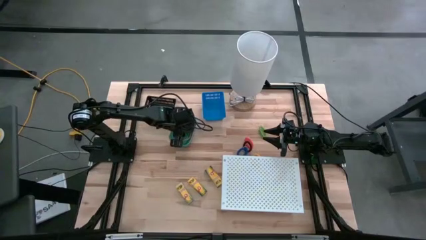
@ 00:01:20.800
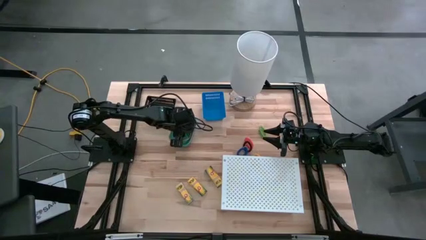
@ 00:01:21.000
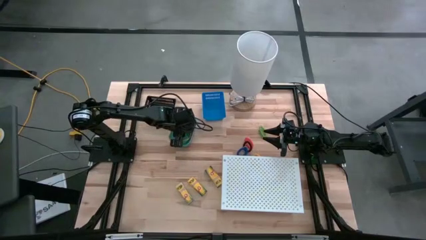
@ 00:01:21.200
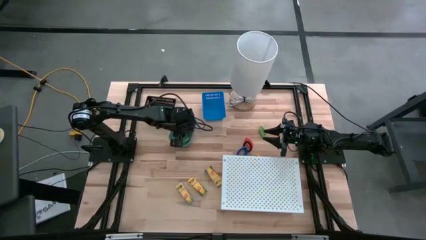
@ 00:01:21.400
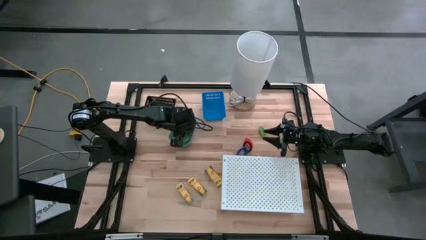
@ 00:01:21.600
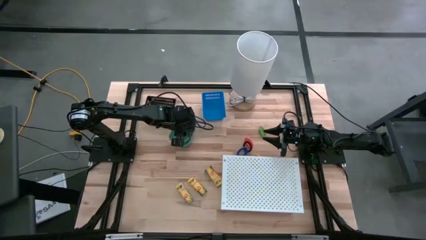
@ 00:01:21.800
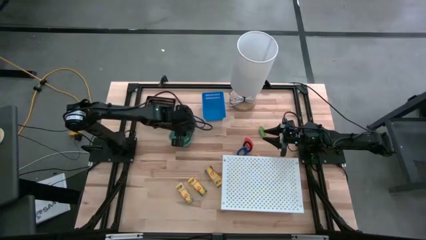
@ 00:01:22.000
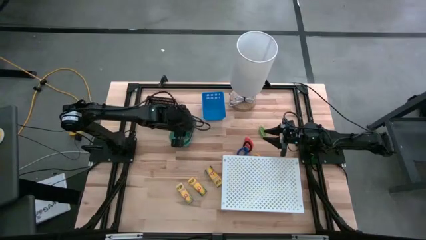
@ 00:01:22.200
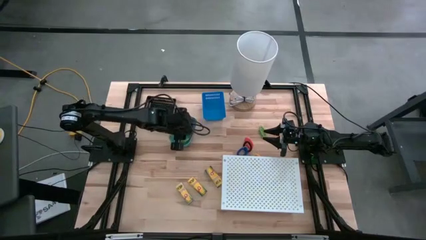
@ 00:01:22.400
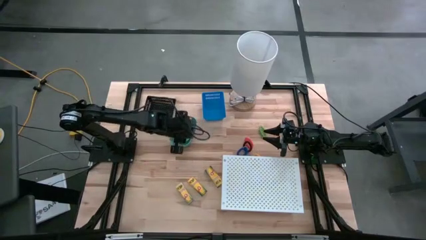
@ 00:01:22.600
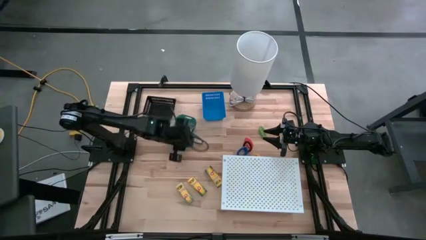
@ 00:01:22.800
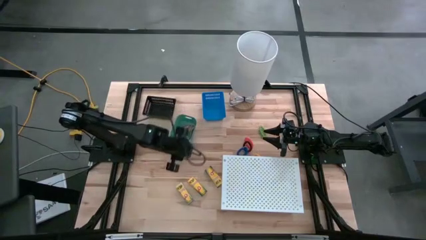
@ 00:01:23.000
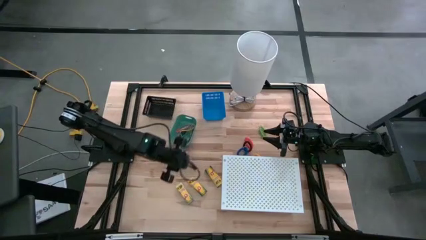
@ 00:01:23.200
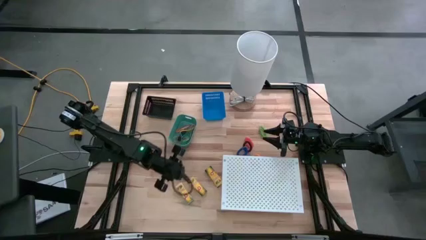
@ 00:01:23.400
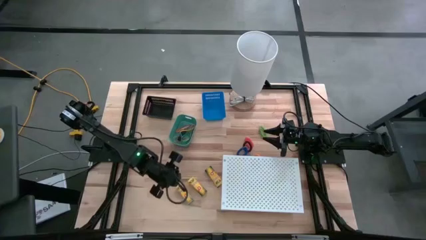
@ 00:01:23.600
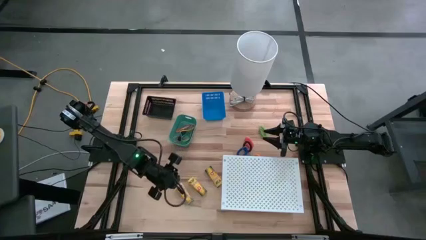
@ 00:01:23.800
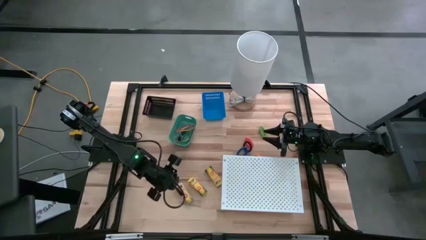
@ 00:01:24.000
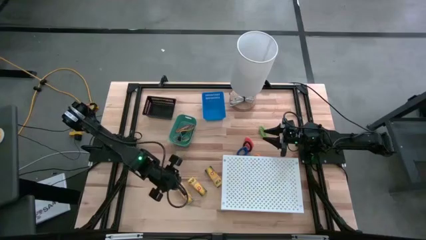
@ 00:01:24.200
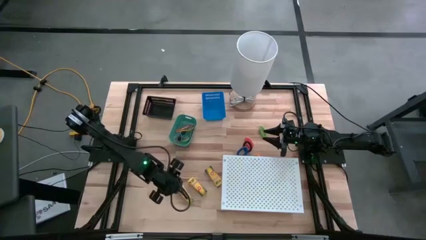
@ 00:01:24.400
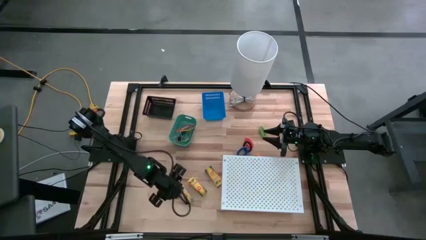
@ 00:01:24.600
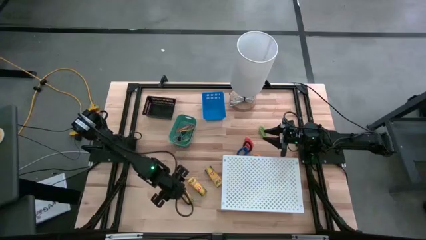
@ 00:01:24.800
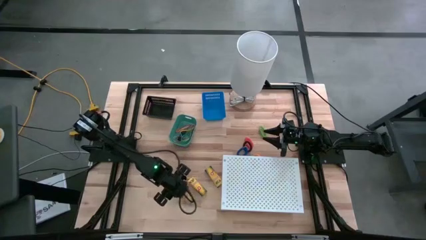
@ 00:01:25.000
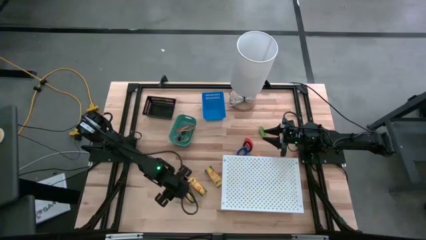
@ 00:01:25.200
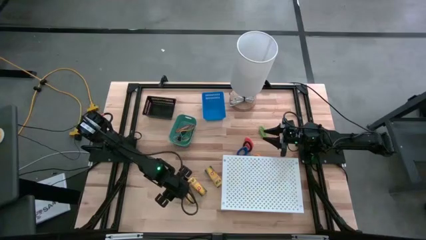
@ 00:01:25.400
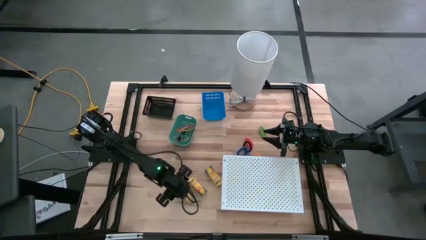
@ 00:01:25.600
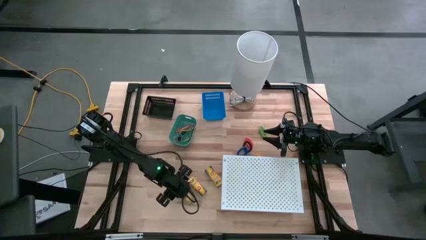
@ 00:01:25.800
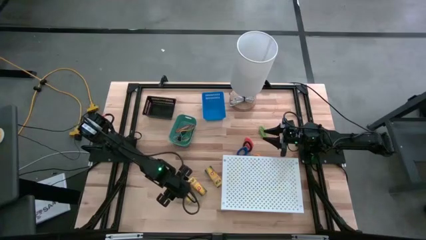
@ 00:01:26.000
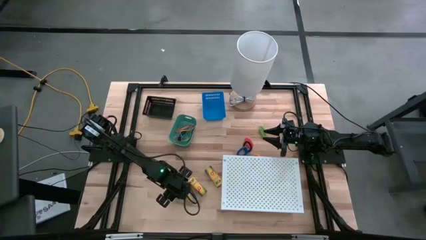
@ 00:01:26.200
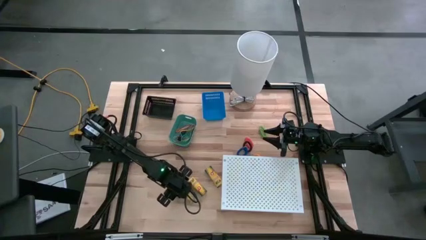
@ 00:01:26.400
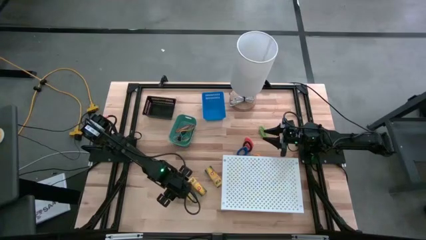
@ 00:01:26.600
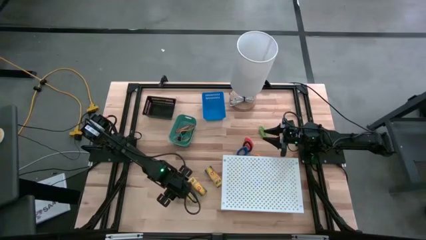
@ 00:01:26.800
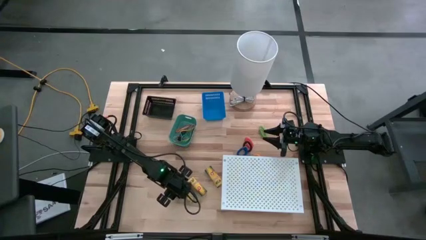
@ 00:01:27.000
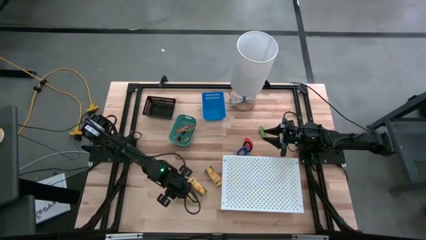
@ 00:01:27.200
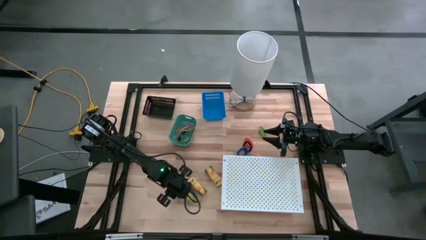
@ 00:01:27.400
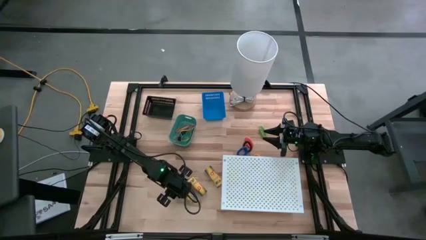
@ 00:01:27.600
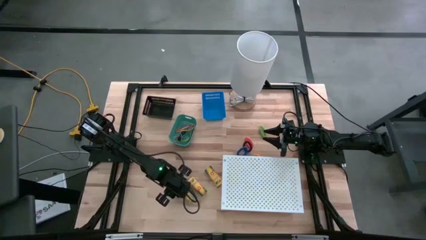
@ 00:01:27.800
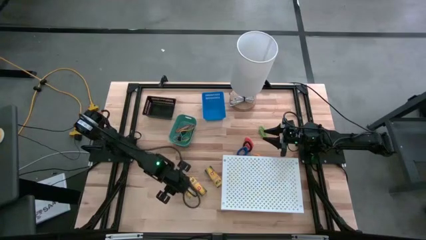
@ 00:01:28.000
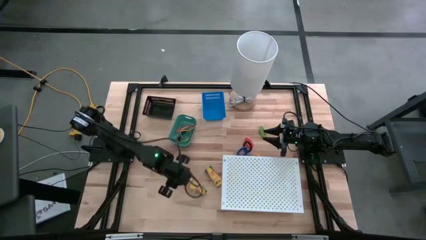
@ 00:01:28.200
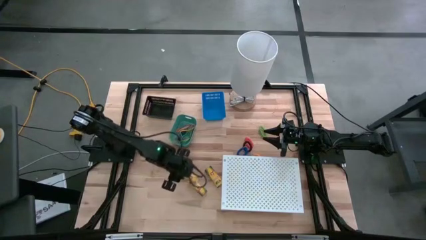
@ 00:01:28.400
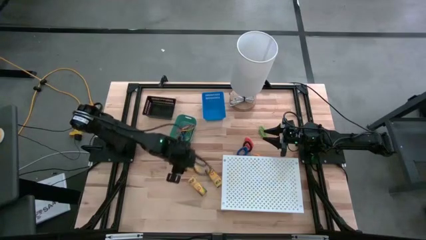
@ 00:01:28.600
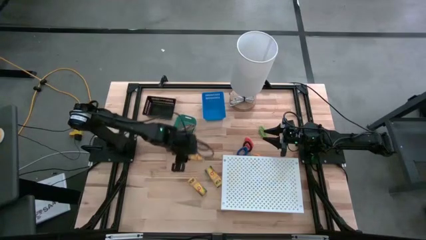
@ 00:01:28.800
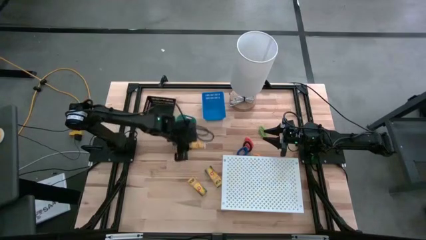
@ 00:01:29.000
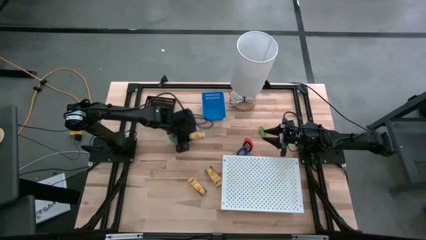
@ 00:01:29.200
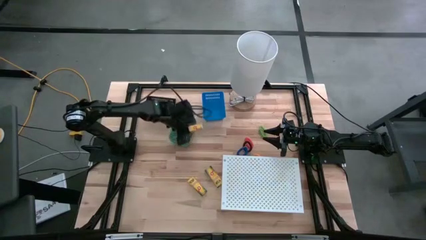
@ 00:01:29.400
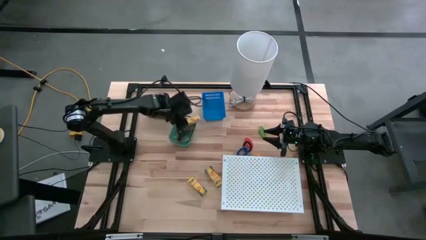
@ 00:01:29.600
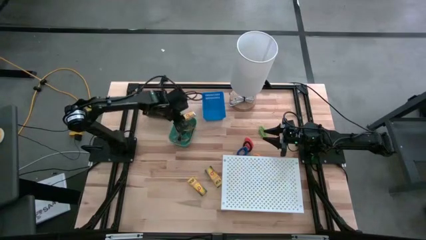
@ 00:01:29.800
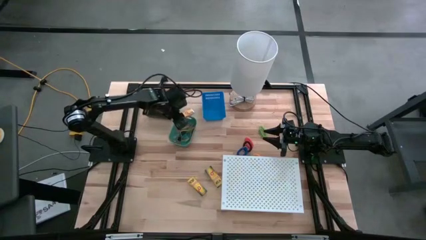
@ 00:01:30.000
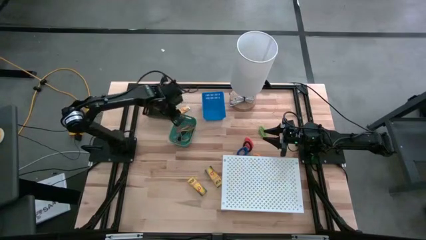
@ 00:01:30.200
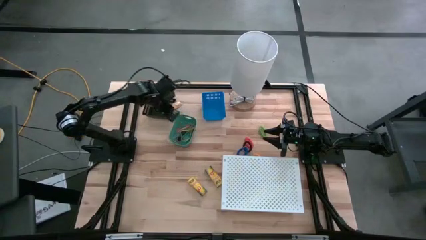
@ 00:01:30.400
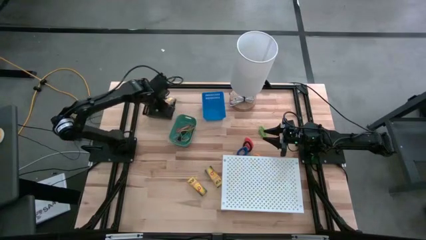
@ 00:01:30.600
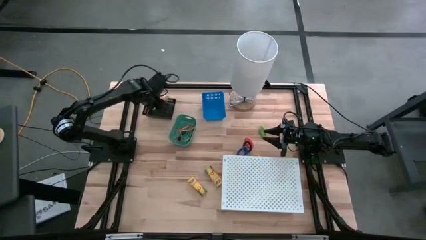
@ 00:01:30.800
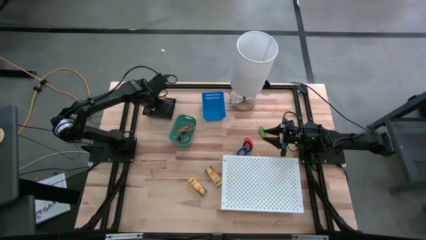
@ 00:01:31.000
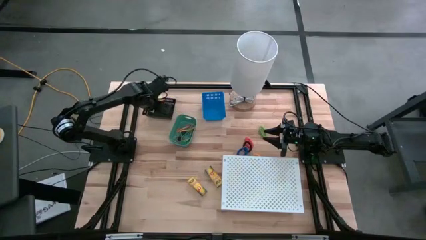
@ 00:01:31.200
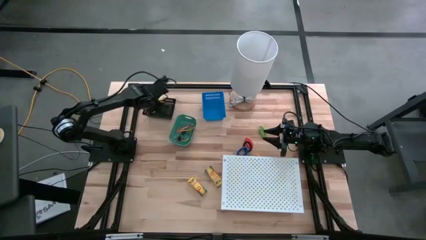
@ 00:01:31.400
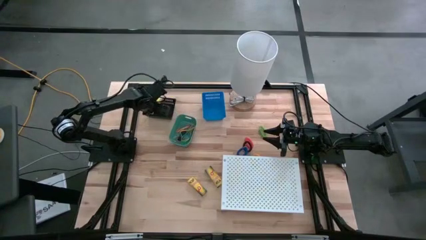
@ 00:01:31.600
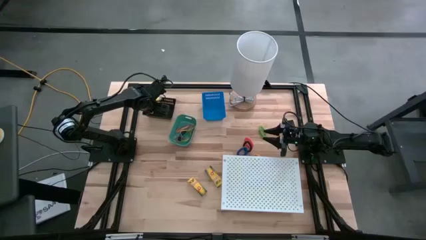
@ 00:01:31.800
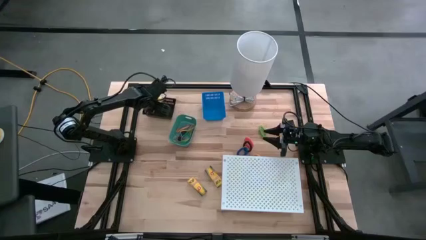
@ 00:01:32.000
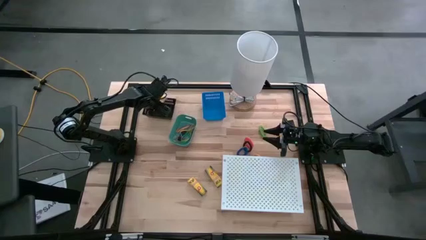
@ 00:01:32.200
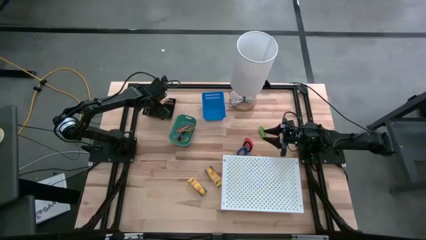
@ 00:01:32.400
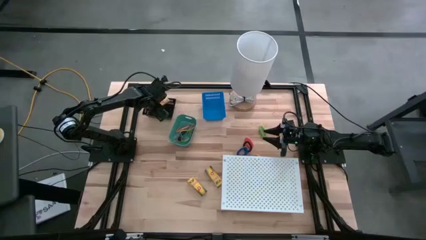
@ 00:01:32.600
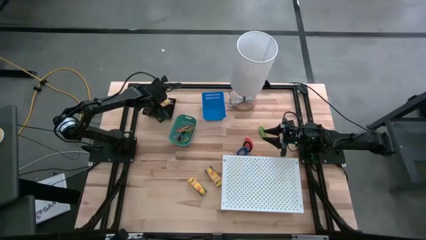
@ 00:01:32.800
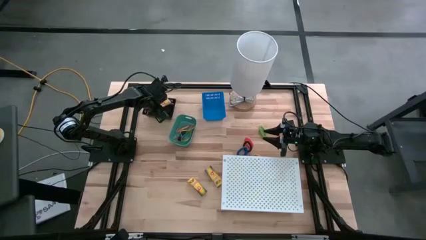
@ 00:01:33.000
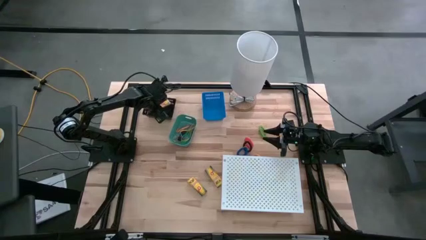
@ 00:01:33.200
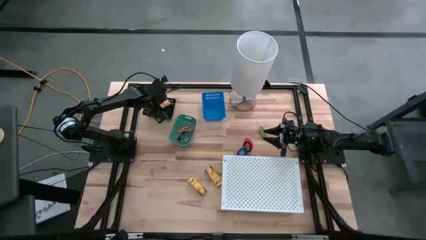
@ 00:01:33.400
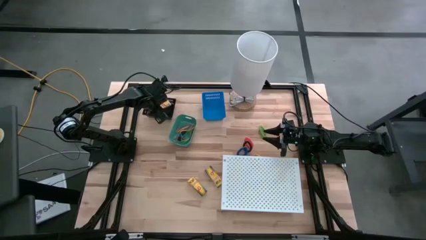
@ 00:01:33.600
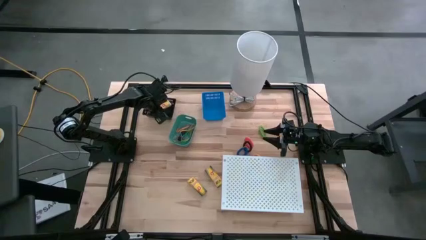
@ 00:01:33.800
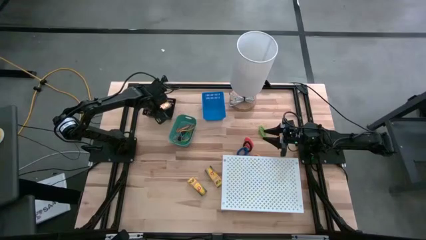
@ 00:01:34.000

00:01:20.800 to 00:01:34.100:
Task: Pick & Place Office Desk Supplies
Put the left yellow crayon box into the black bin

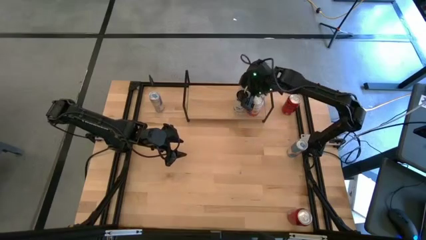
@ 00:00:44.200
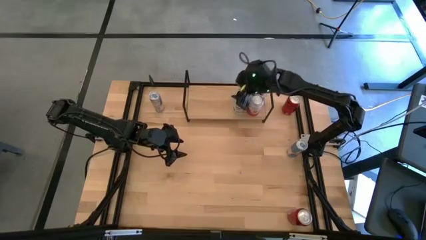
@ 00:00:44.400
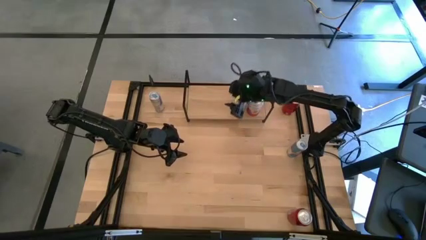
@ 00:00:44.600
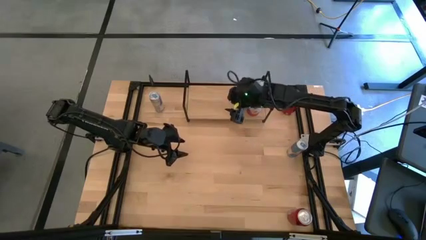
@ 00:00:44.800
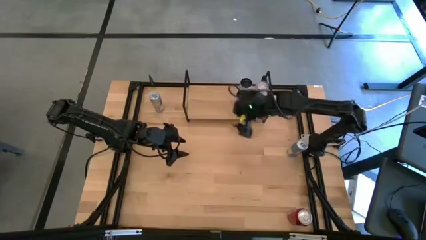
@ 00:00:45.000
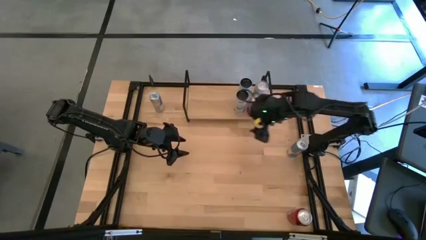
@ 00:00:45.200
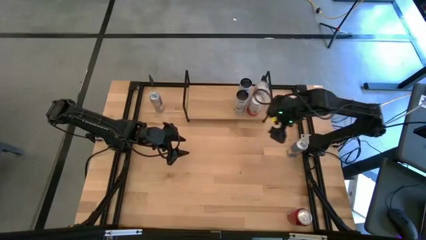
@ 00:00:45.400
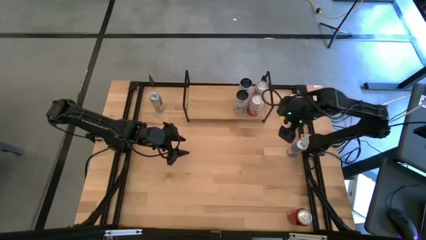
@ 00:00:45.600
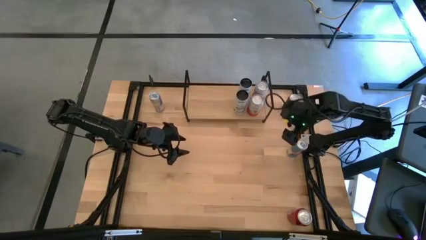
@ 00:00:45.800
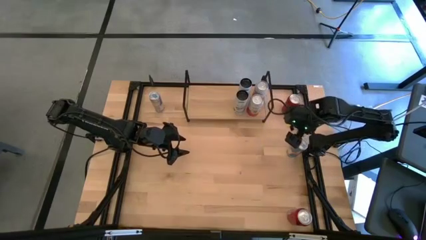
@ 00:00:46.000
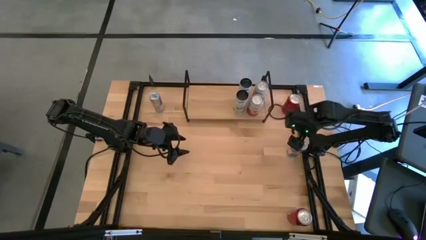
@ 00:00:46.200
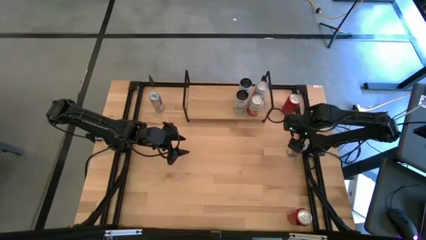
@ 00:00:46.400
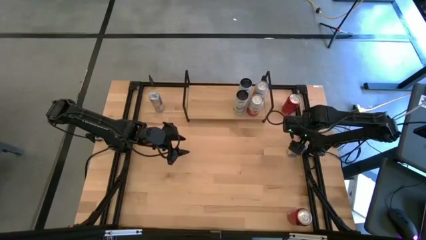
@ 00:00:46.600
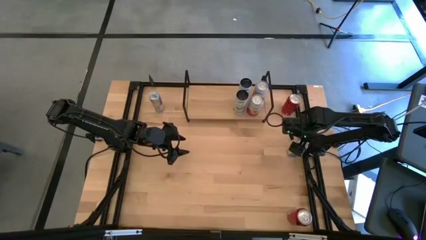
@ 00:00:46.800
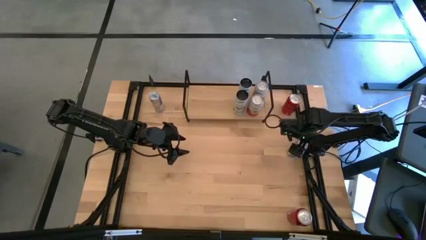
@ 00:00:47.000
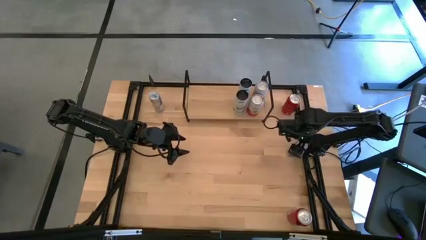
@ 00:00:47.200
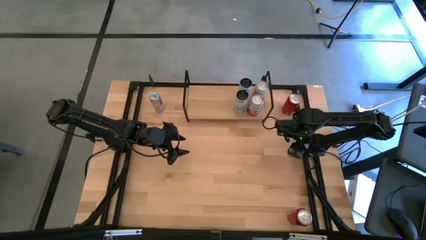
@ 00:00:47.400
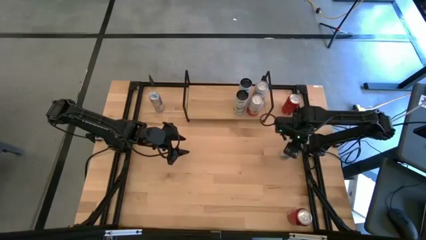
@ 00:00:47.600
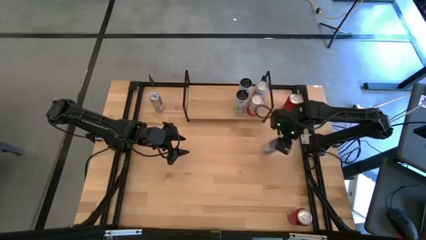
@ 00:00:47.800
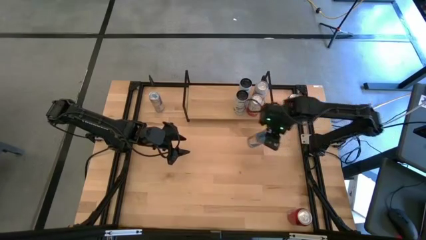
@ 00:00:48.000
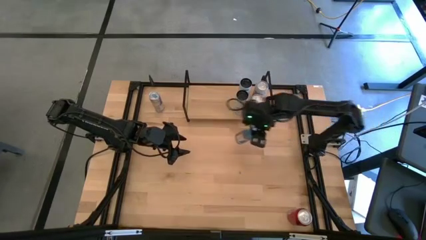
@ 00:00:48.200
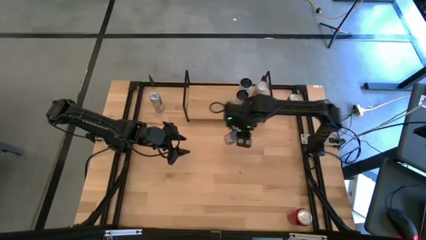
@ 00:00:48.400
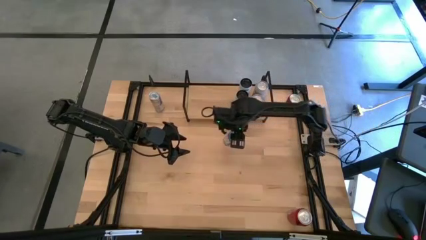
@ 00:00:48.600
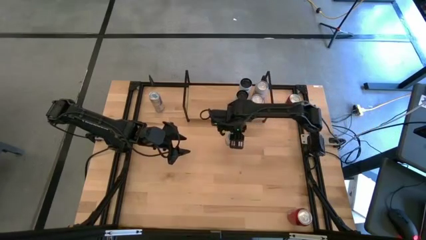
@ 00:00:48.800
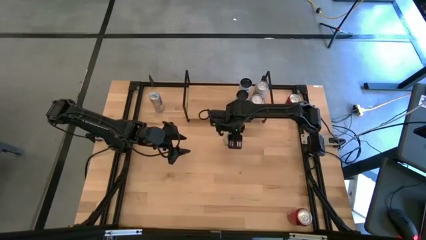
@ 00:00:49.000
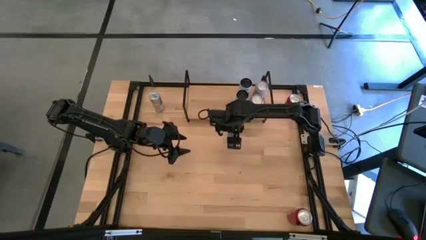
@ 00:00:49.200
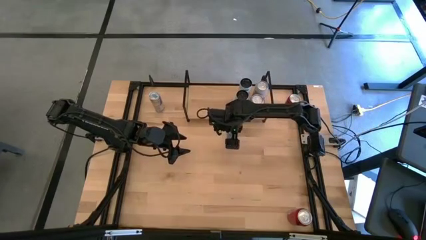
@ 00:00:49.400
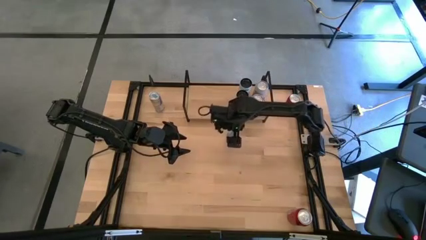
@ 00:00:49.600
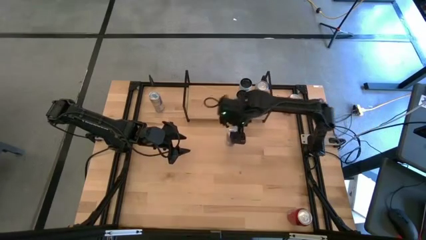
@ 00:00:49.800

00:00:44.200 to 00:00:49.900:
Task: Place canned beverage on shelf
Move the right blue soda can to the center of the table
